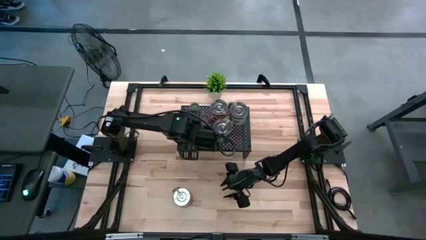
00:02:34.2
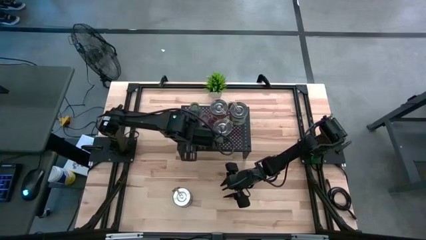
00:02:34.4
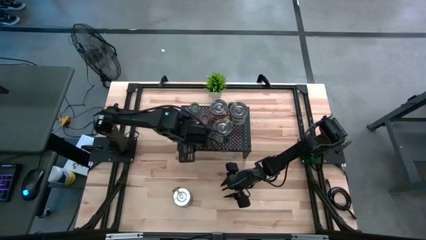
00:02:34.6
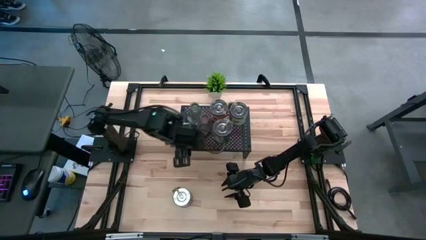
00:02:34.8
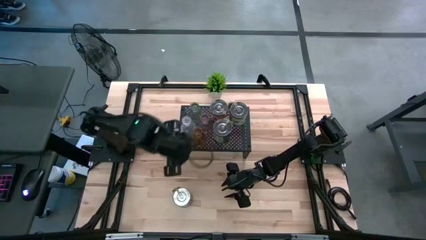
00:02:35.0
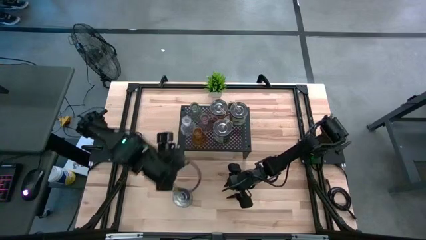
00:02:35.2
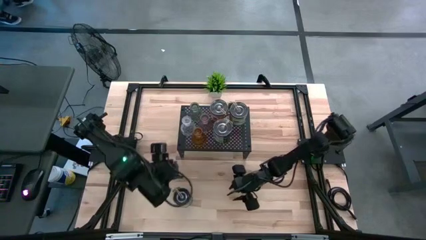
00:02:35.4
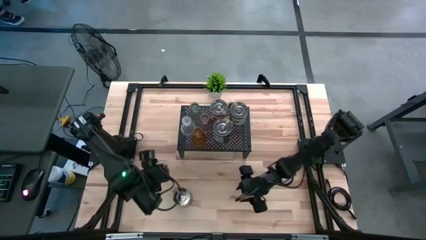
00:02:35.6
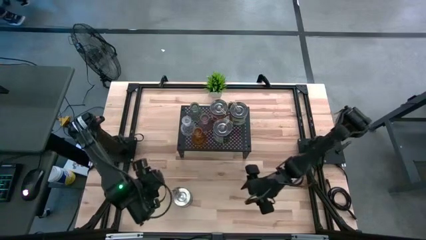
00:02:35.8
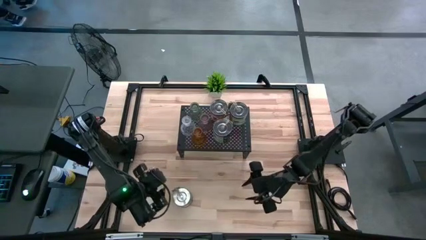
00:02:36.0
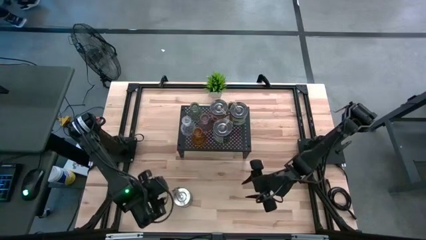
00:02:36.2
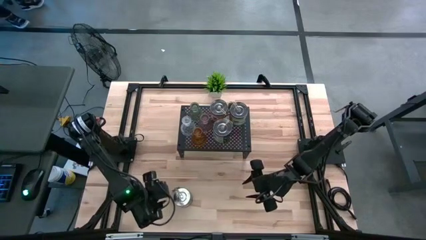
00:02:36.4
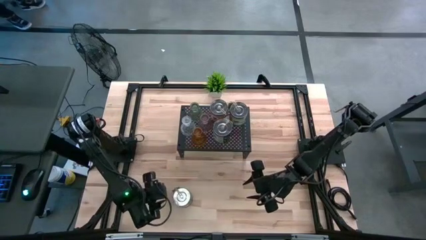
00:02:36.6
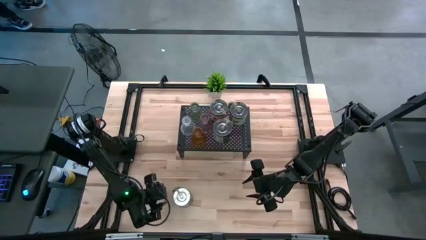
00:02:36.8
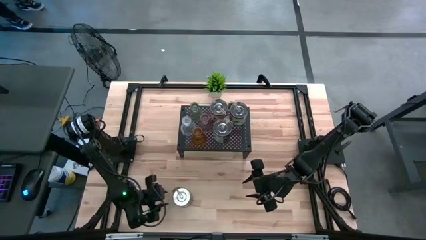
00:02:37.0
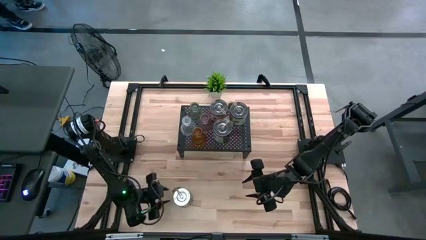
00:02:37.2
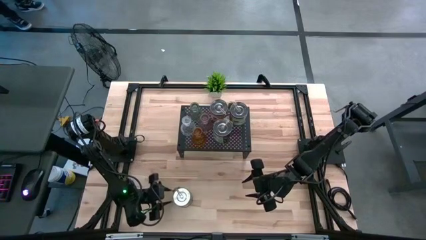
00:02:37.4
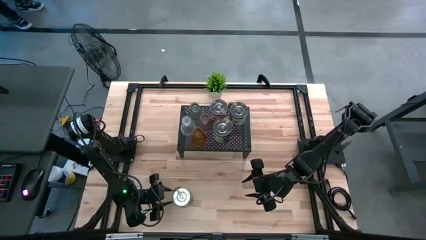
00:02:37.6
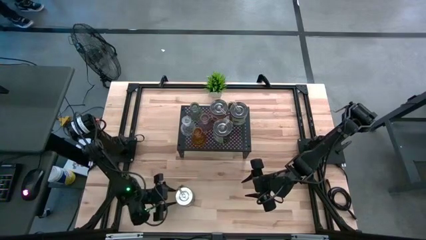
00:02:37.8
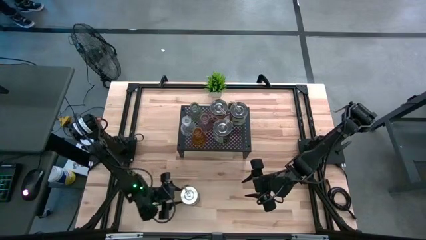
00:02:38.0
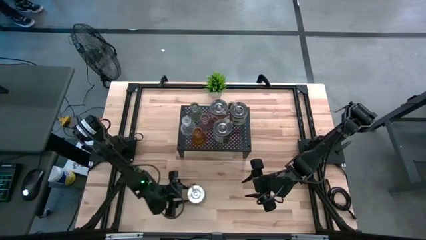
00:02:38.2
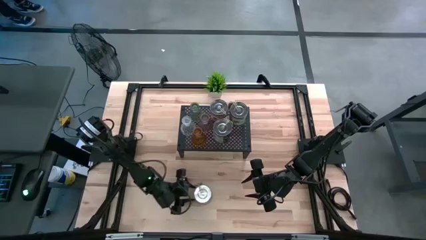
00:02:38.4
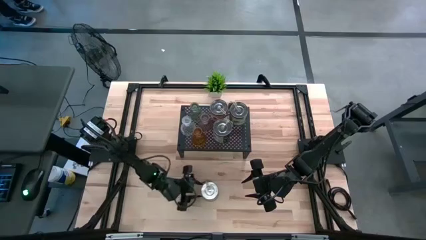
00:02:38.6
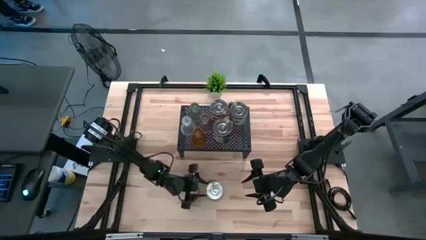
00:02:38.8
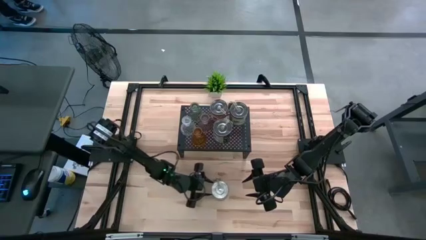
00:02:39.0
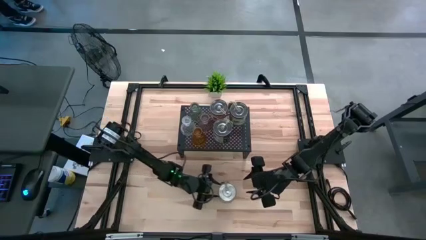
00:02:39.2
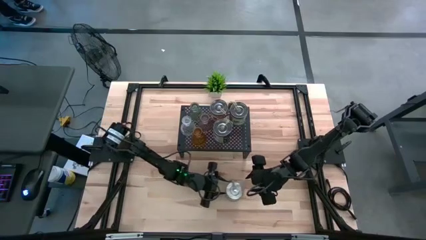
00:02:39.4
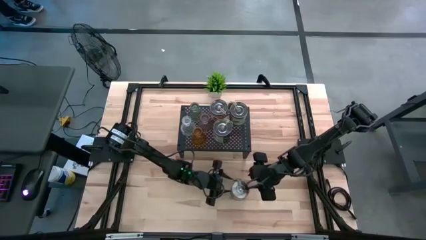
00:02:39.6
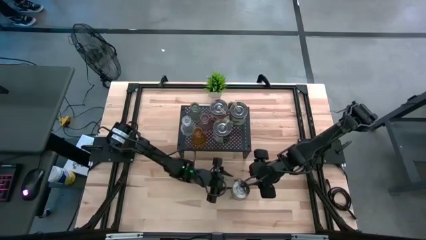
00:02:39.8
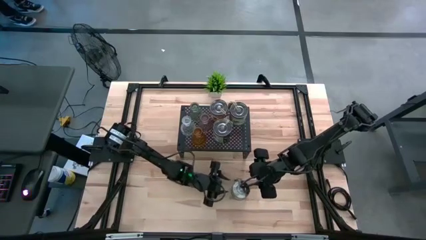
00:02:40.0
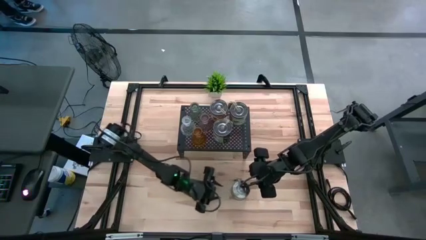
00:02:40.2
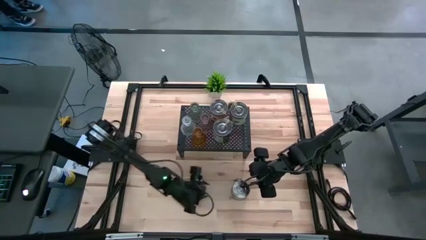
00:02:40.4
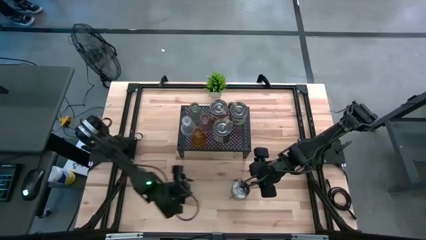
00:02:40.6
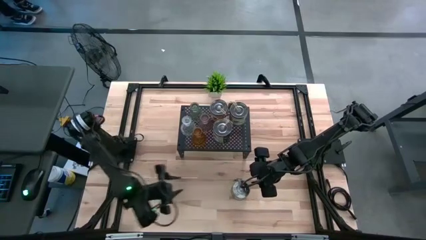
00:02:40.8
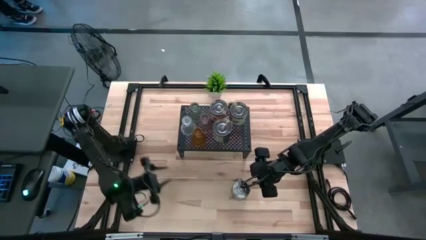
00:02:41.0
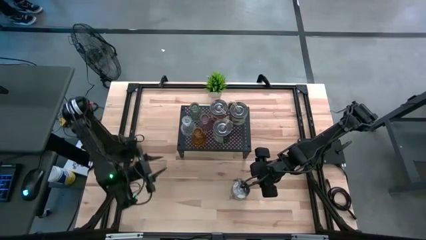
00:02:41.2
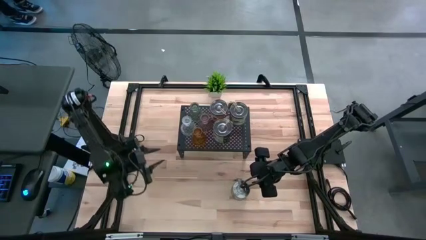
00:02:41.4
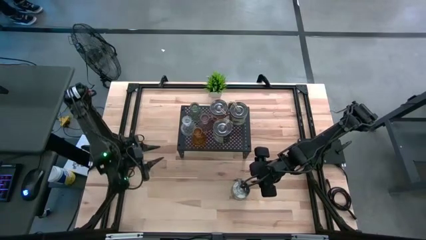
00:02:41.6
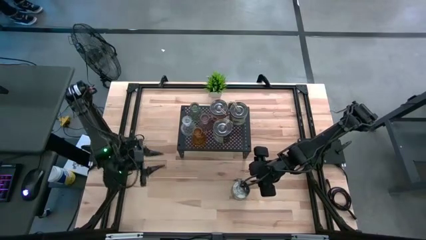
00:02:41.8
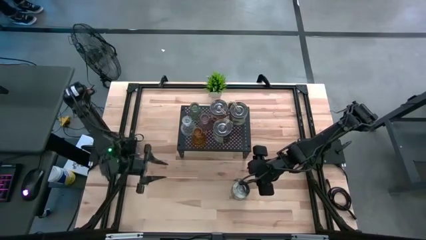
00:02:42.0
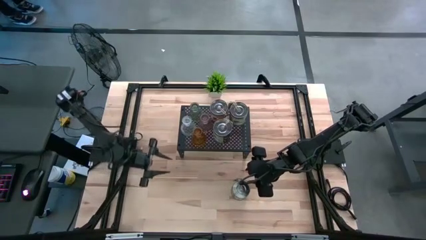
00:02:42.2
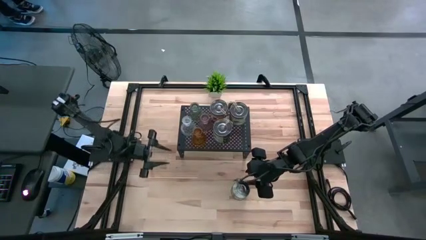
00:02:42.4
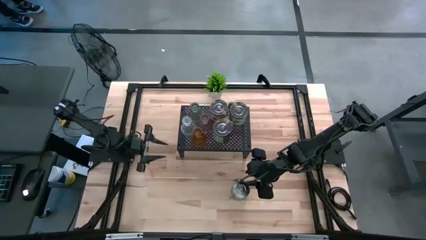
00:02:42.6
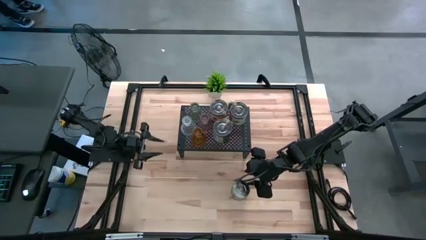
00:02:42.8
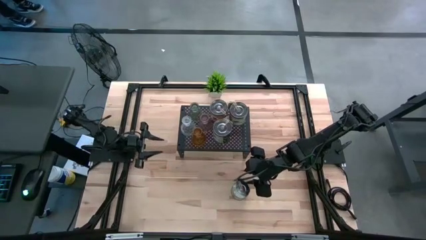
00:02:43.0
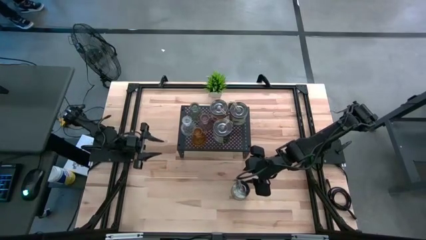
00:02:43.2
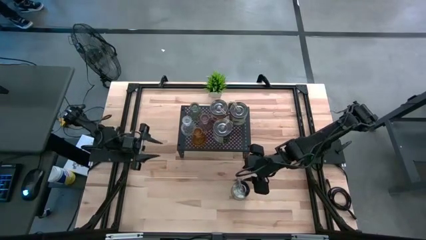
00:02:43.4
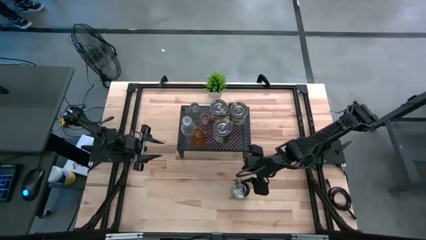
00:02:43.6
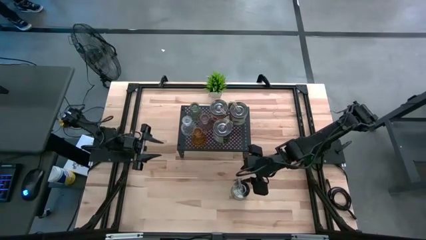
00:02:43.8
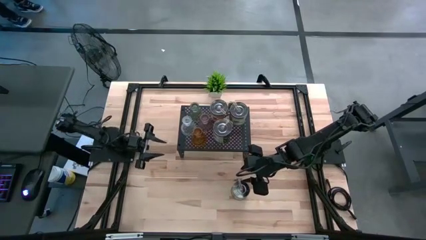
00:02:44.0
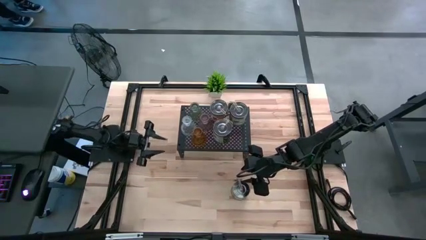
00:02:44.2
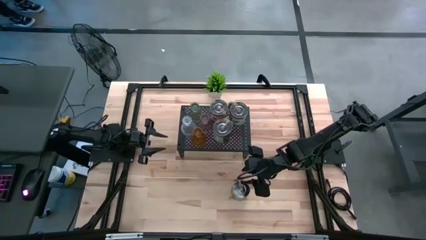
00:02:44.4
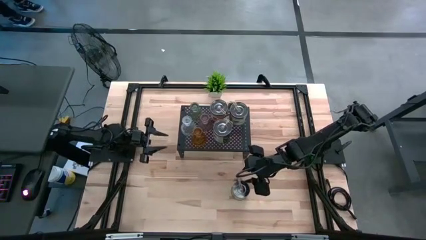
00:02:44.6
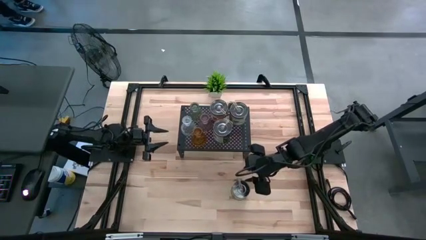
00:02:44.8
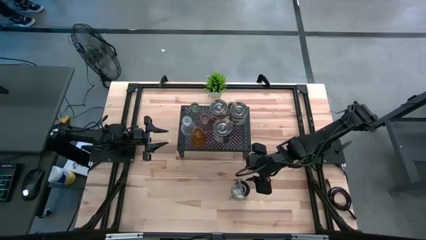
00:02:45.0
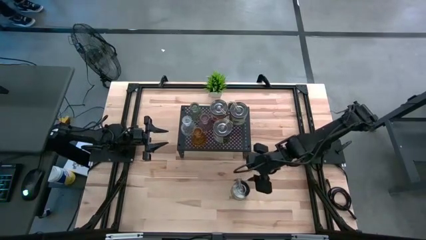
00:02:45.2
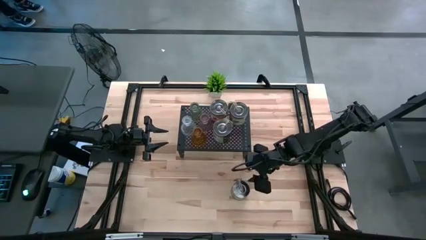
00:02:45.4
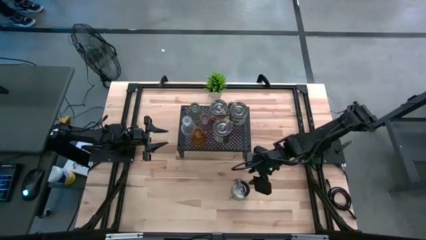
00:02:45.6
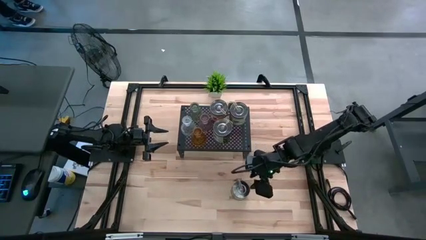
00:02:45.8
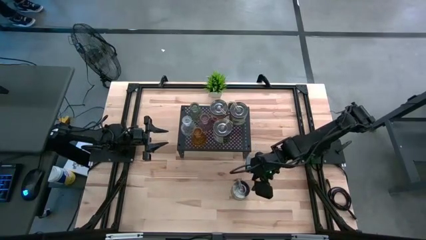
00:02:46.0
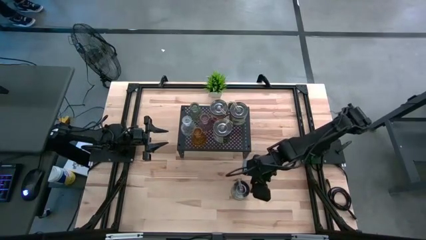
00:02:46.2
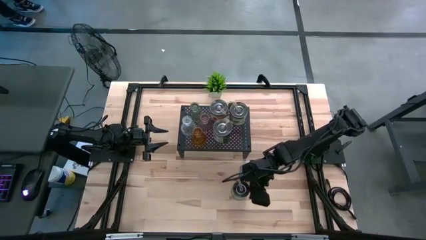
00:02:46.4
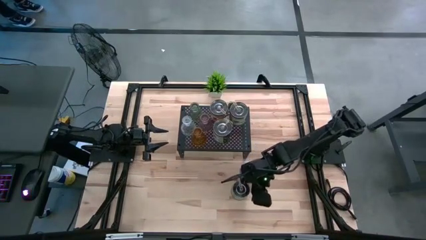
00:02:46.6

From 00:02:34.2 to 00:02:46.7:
Task: Pick & Place candle stick holders
Put the brown scented candle on the shelf

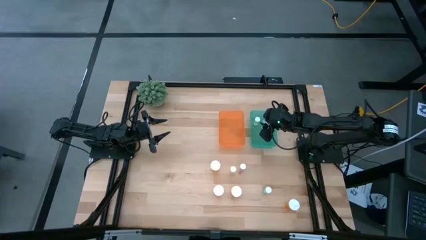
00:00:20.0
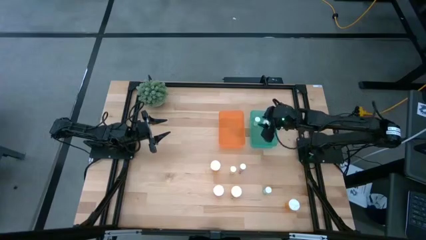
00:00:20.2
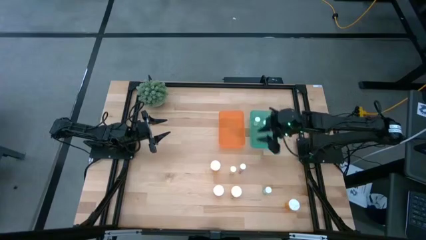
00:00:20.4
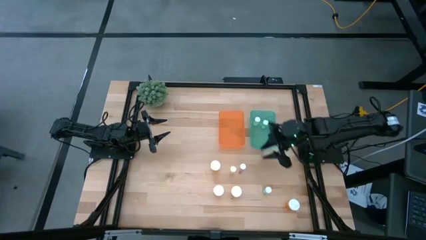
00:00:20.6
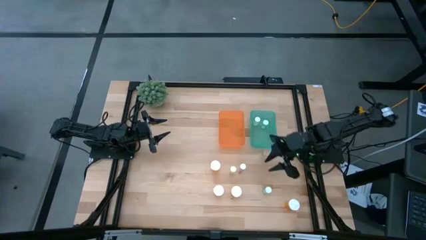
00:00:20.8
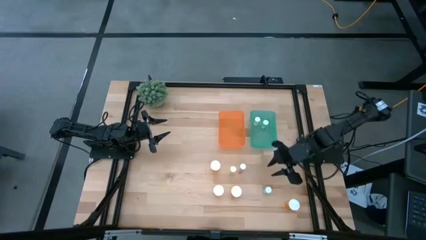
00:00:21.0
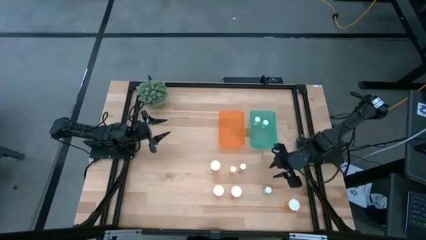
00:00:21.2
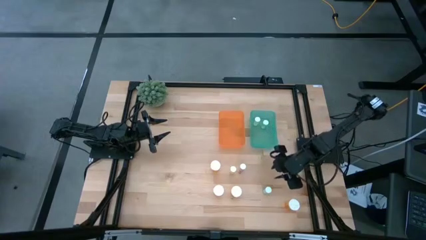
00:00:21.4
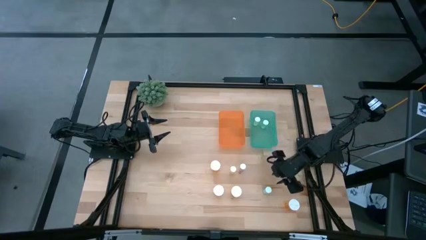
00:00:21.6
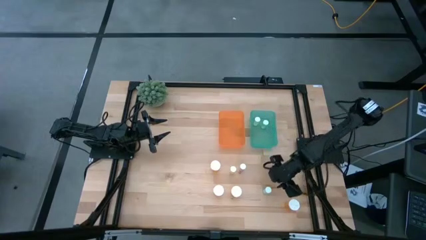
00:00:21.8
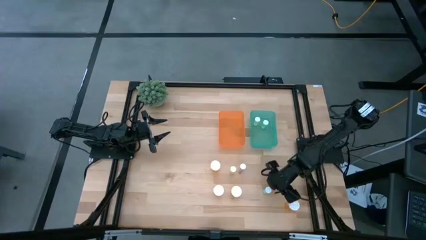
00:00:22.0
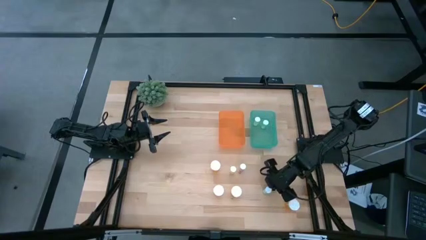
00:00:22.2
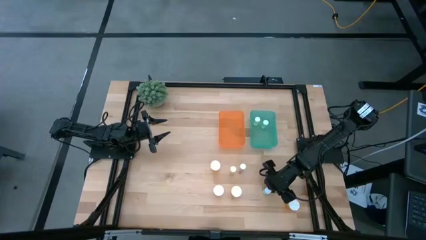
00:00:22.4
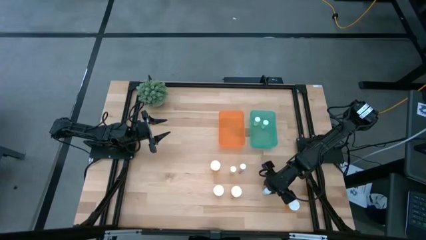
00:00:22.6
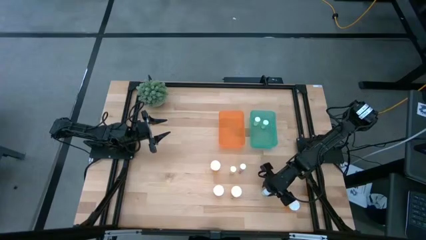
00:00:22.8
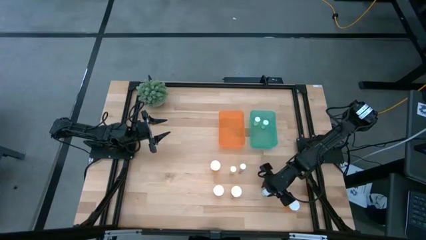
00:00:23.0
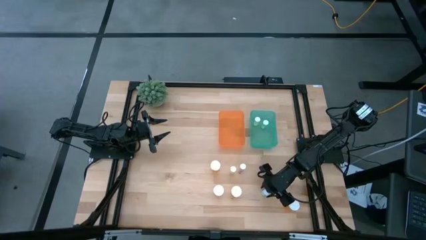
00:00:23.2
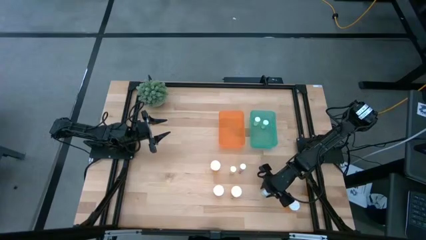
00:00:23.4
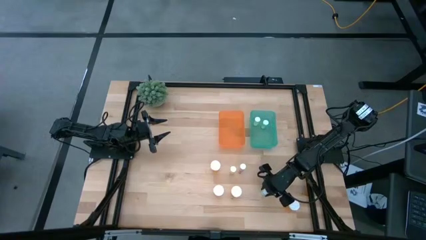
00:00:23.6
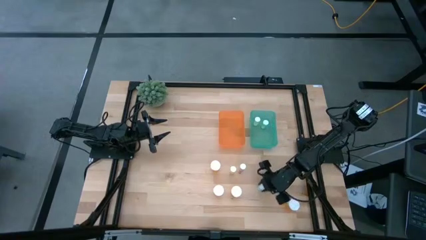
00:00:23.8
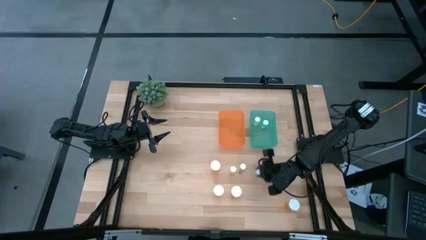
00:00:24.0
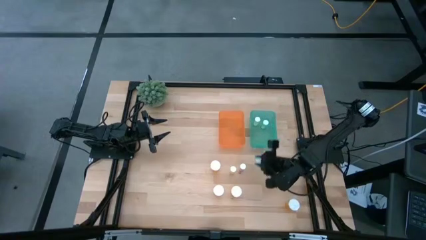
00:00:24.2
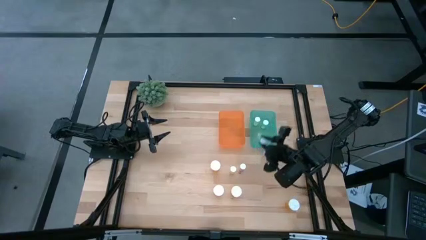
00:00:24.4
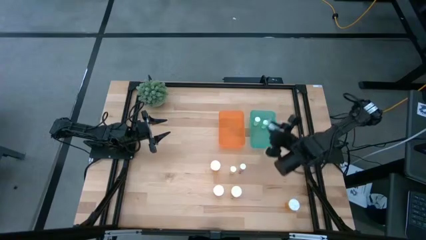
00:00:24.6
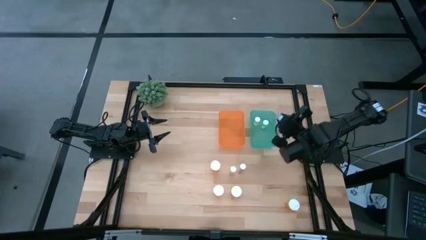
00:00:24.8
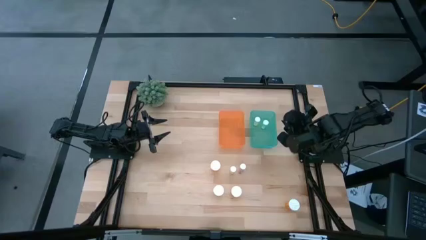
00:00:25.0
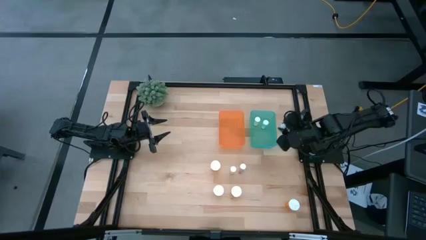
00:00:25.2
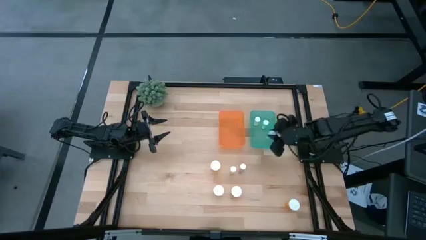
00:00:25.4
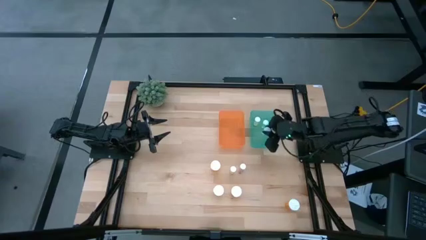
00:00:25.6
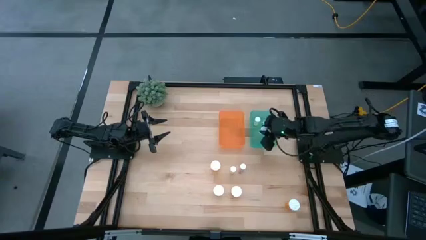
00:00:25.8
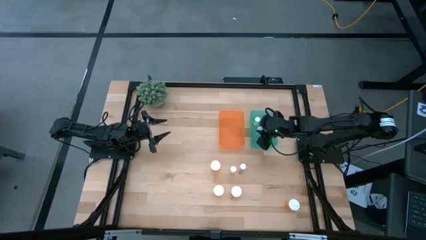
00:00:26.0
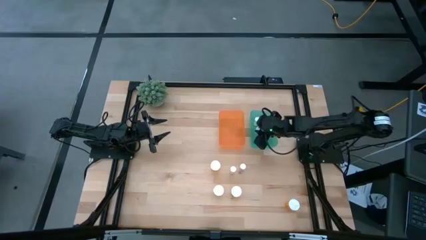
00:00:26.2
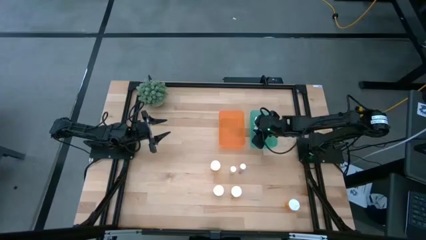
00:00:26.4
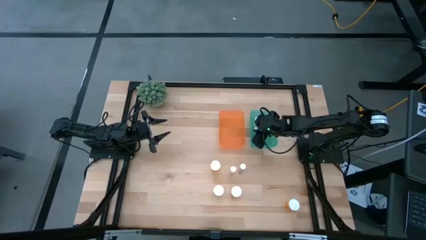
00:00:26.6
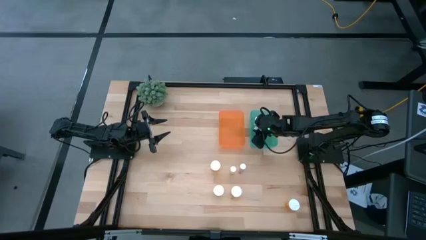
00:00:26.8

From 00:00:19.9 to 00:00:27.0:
Task: Pick and place medicine bottles into bin by pill shape (circle, oval)
Put the small green pill bottle into the green bin
